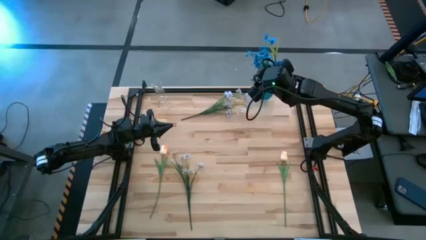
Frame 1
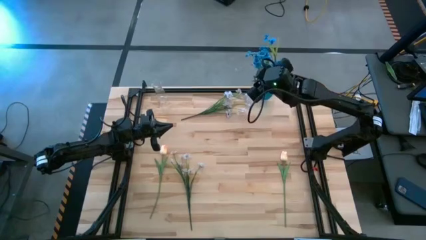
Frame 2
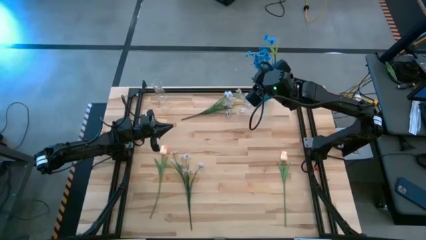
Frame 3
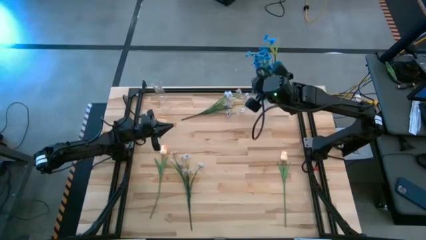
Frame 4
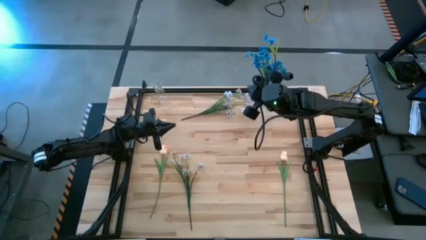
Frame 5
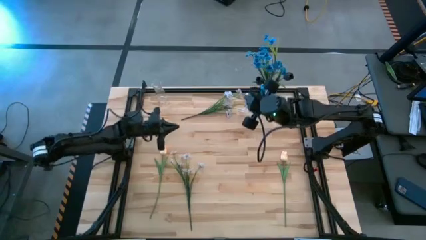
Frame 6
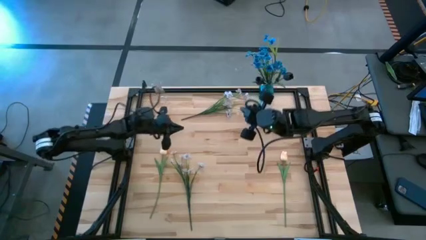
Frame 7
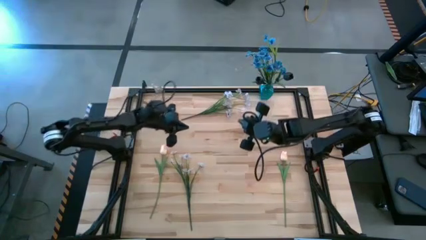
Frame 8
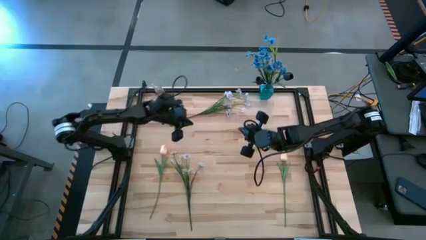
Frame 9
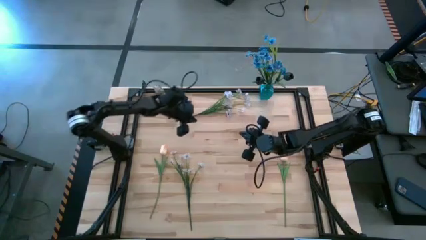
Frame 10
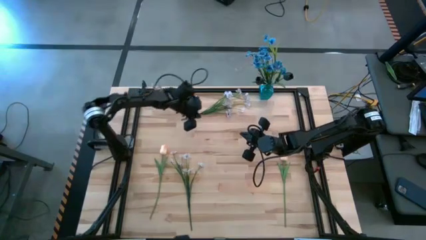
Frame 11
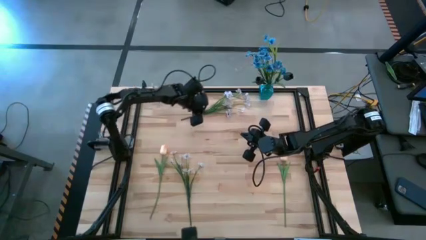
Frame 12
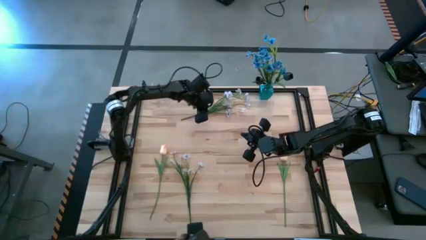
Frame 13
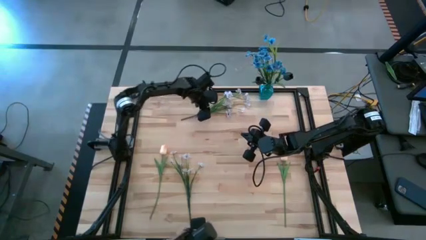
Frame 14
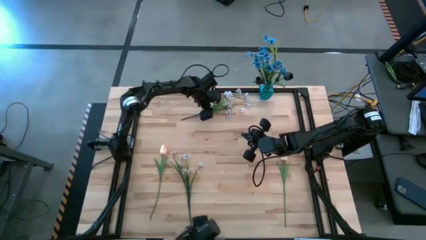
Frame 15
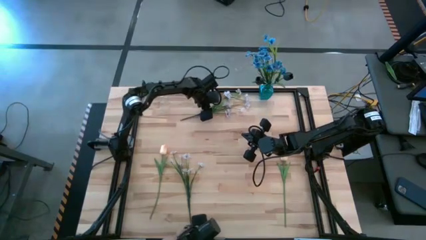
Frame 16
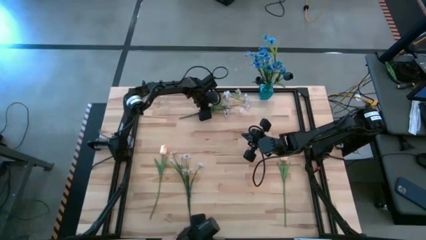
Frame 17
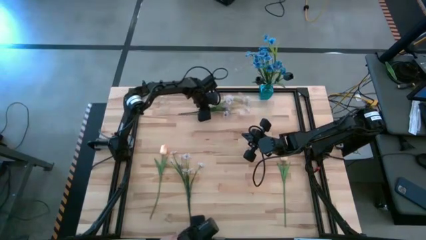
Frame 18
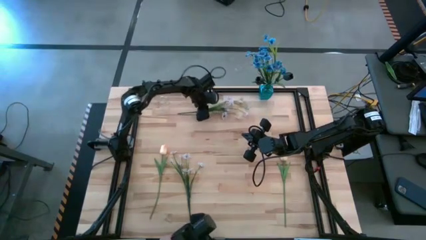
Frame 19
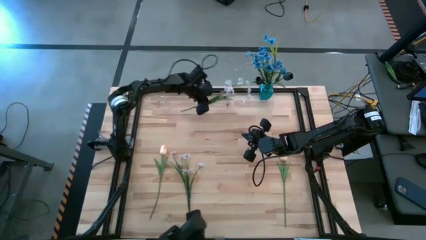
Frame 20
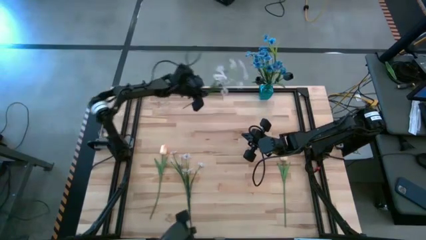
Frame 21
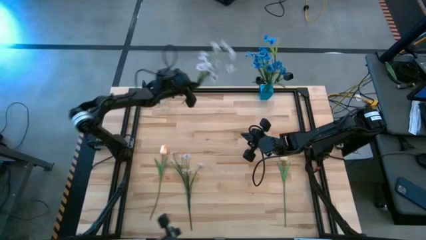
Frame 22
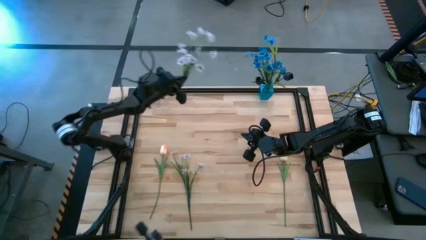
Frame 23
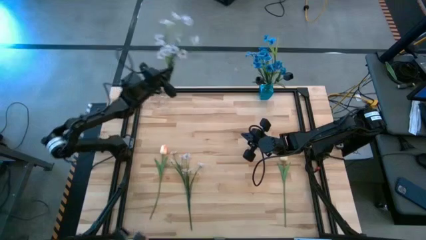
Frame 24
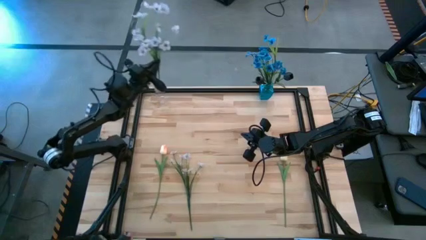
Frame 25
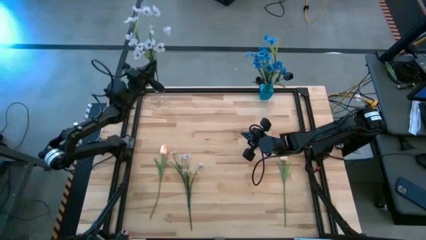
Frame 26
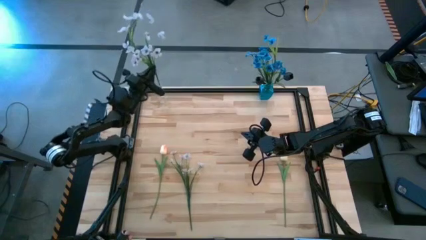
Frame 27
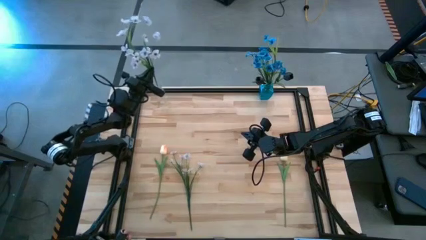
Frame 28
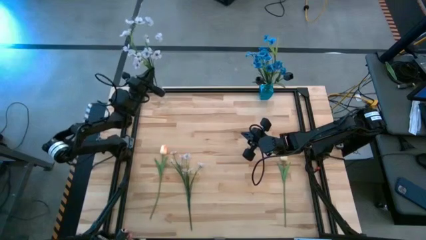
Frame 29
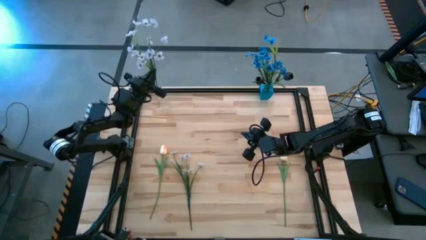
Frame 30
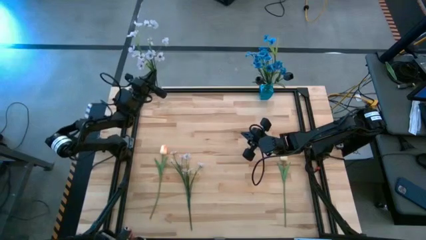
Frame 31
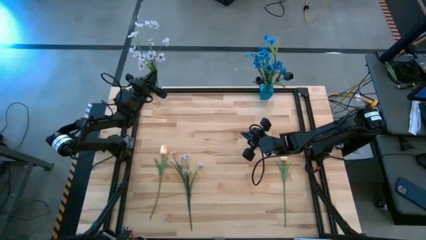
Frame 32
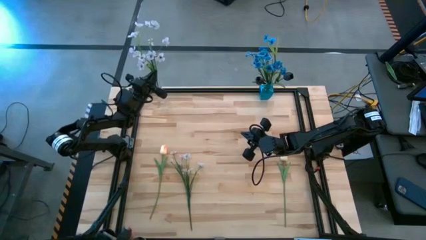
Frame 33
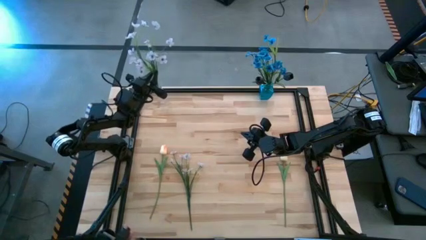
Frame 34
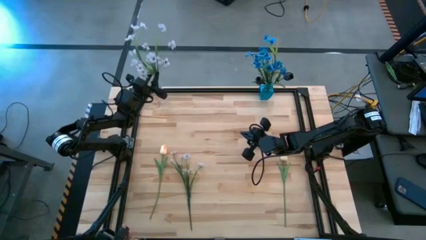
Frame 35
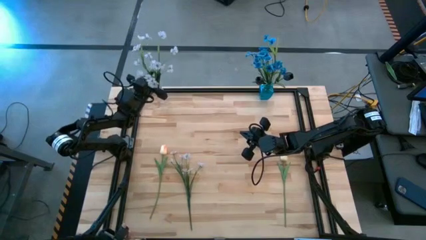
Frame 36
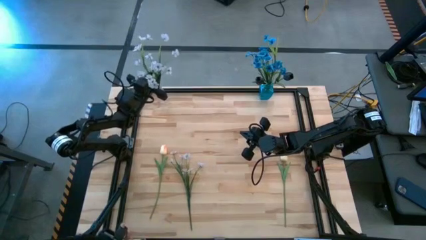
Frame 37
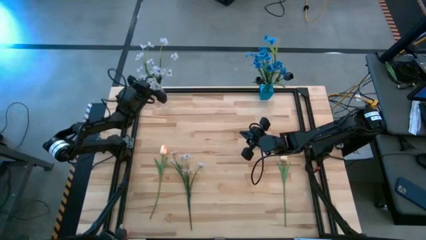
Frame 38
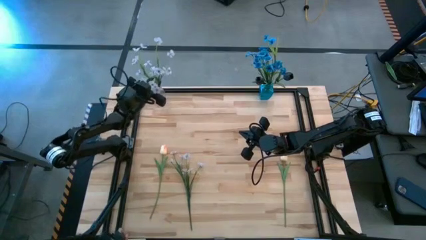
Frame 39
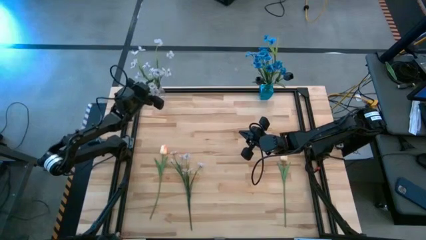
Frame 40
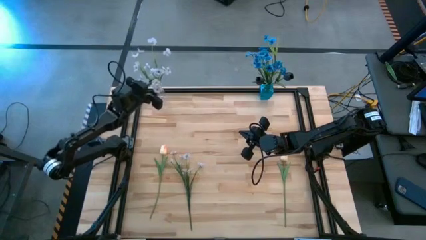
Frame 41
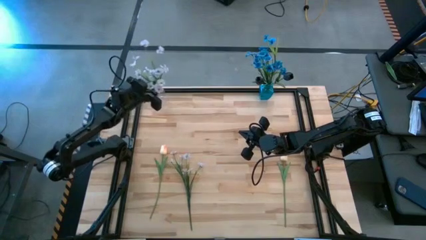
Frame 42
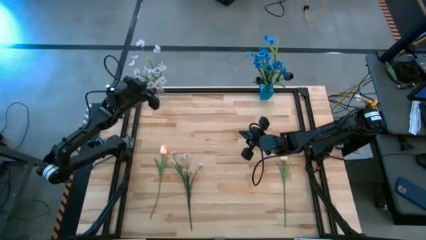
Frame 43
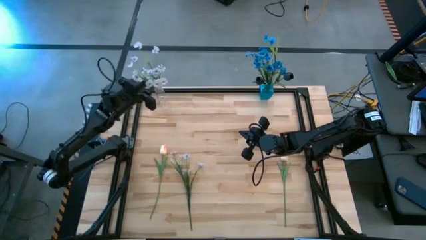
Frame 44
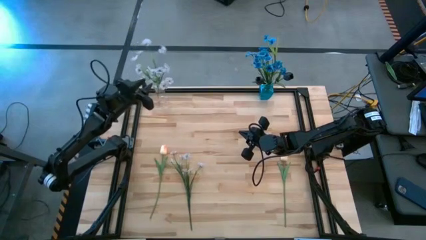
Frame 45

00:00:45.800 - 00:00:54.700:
Task: Sort flowers into vase by color
Put the top white flower into the transparent vase

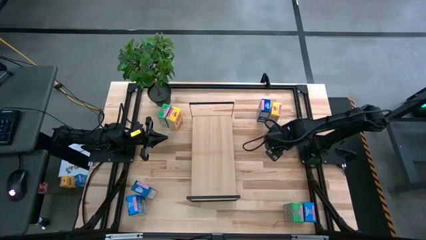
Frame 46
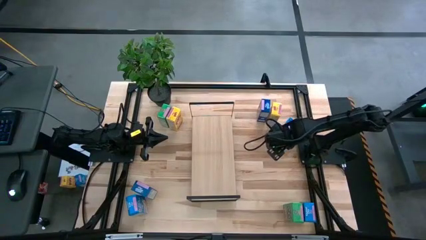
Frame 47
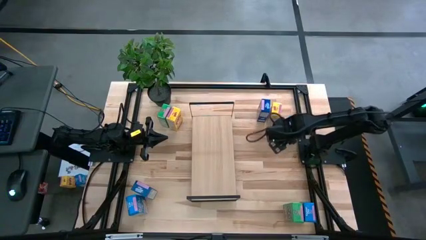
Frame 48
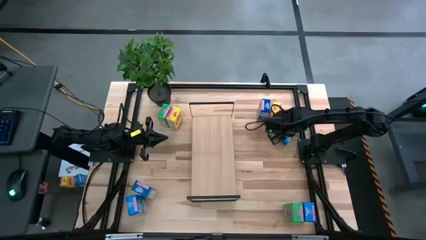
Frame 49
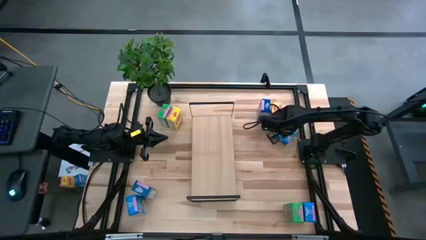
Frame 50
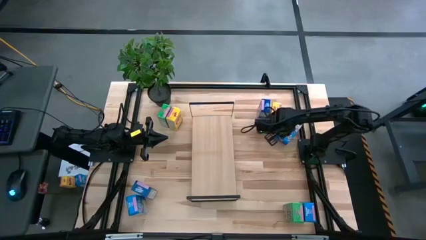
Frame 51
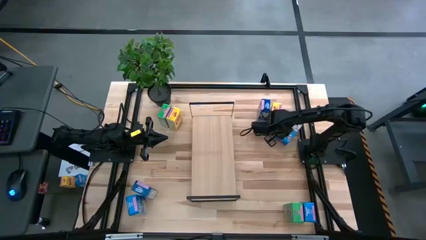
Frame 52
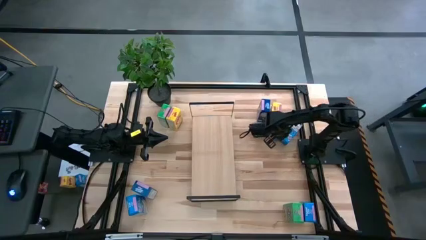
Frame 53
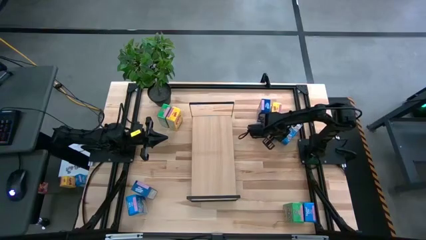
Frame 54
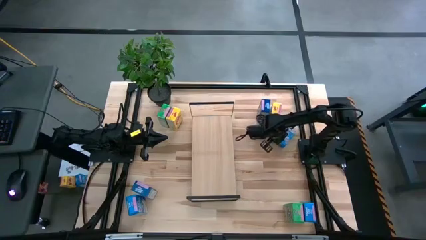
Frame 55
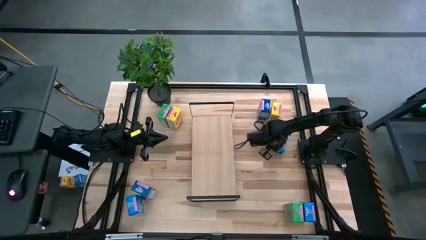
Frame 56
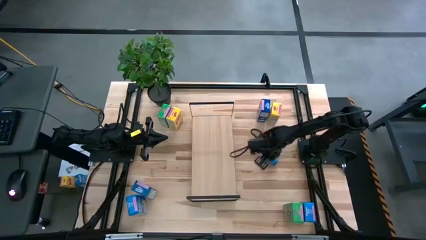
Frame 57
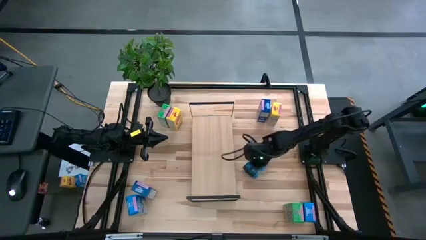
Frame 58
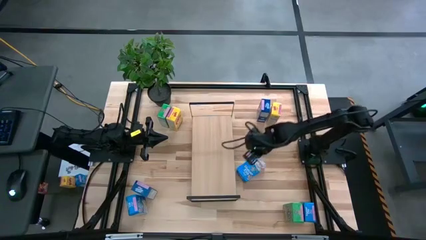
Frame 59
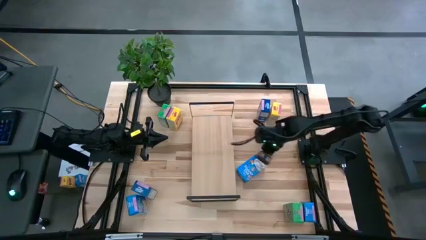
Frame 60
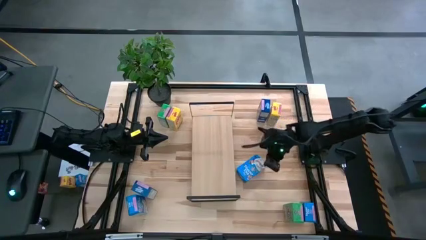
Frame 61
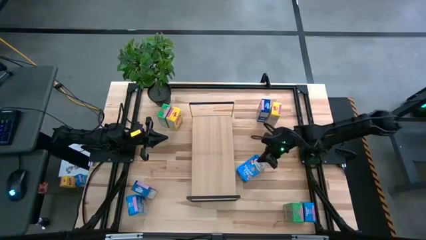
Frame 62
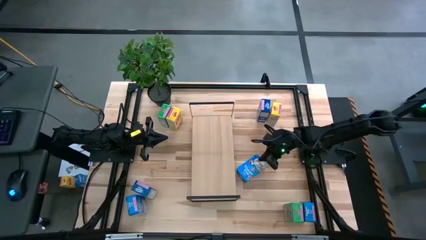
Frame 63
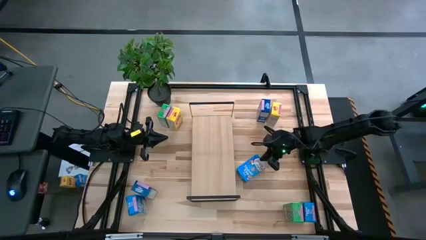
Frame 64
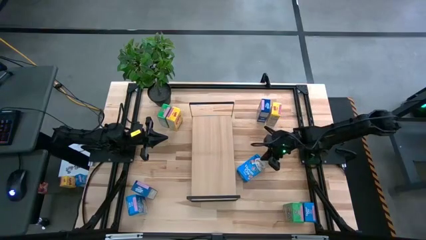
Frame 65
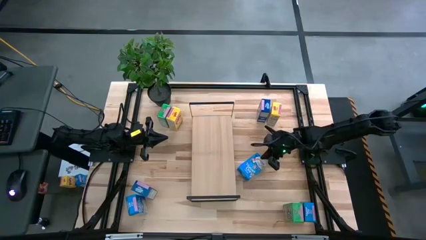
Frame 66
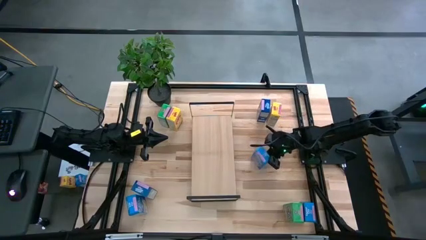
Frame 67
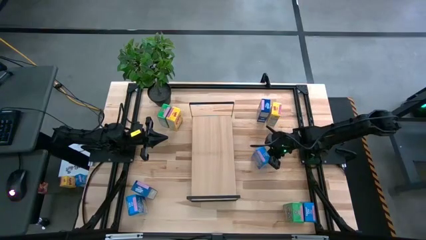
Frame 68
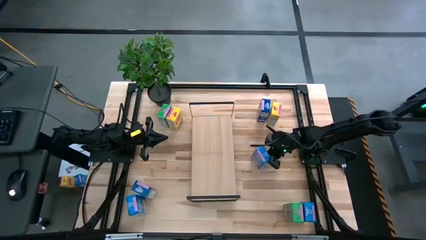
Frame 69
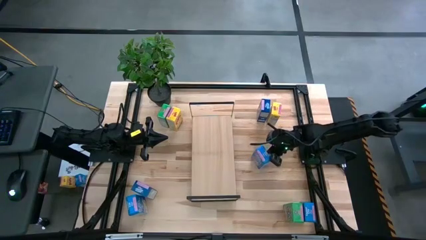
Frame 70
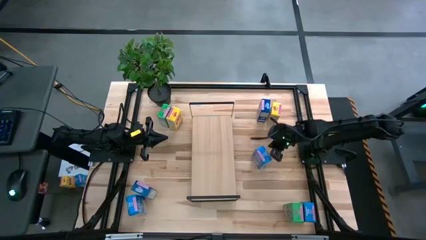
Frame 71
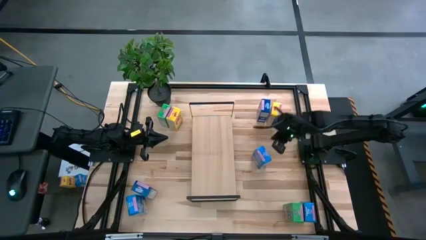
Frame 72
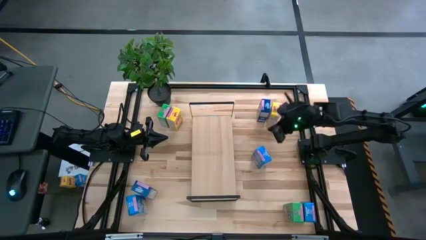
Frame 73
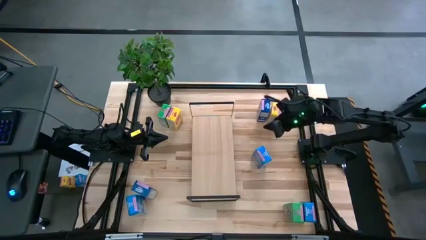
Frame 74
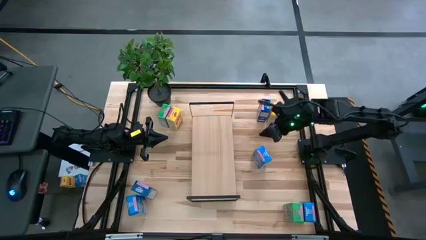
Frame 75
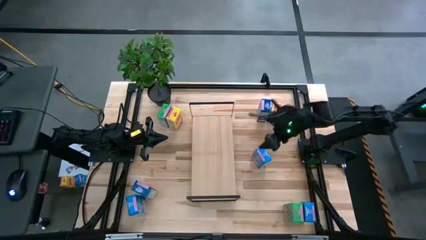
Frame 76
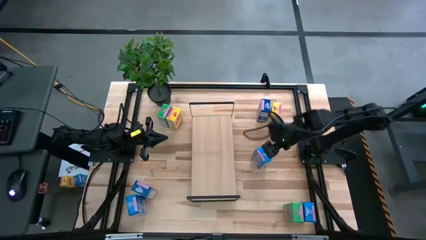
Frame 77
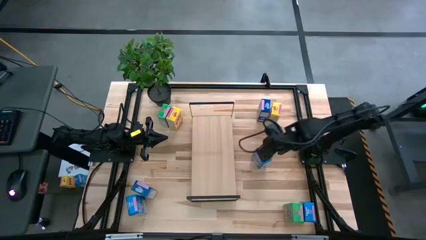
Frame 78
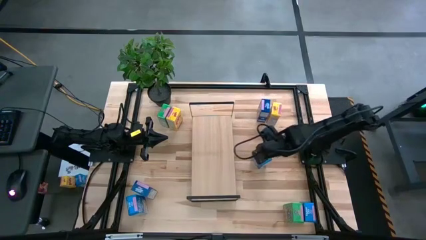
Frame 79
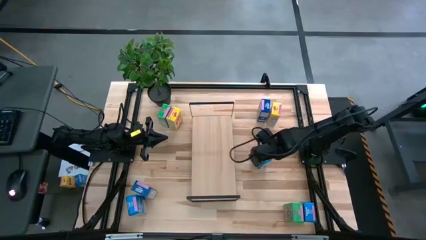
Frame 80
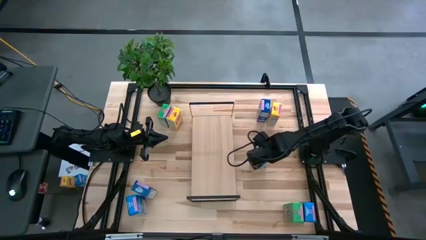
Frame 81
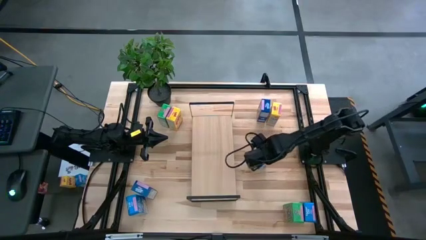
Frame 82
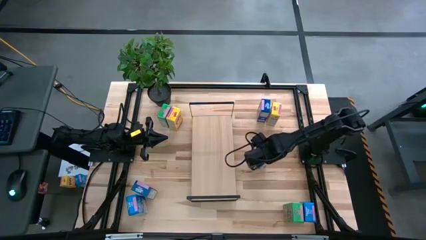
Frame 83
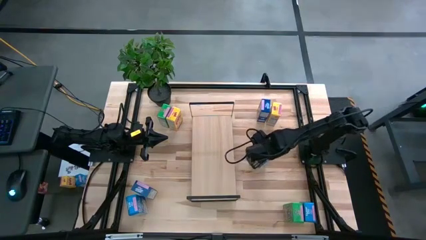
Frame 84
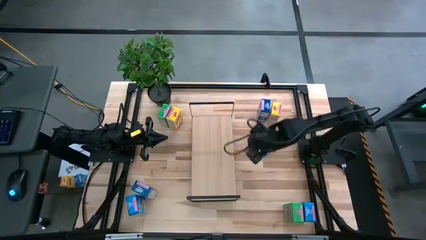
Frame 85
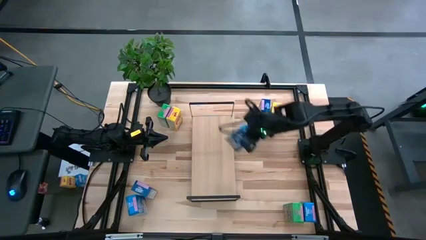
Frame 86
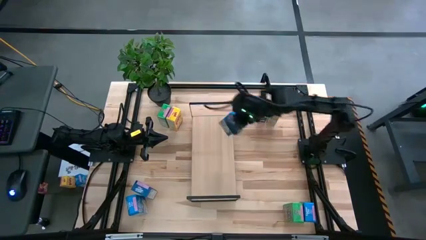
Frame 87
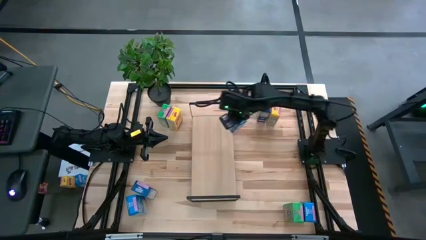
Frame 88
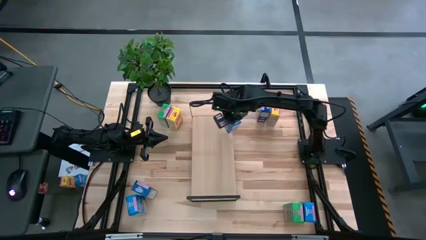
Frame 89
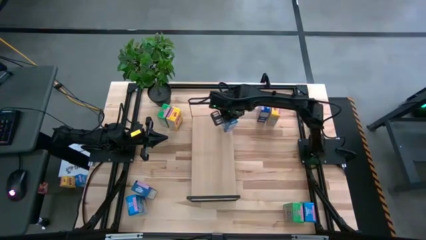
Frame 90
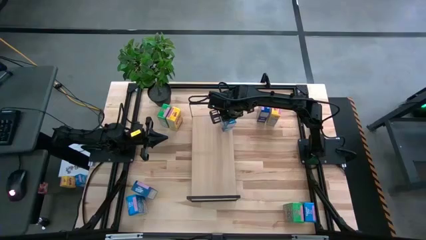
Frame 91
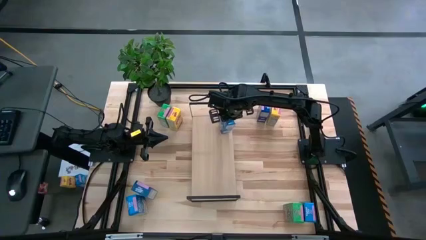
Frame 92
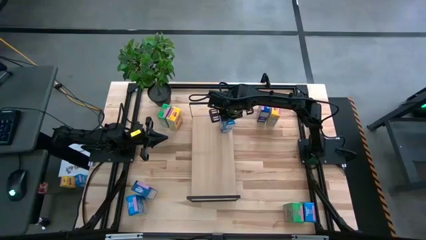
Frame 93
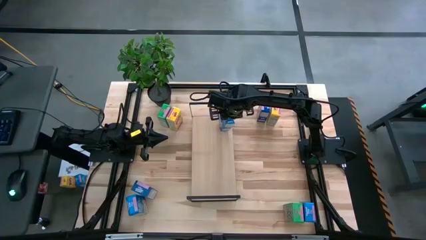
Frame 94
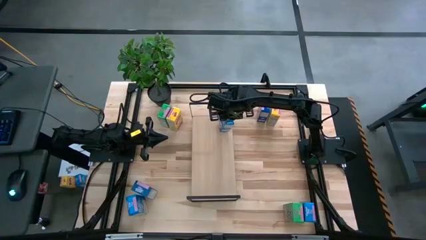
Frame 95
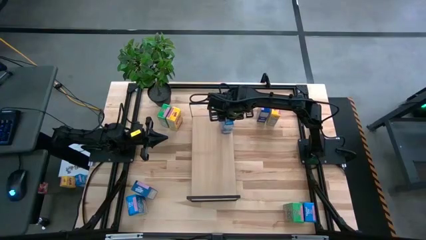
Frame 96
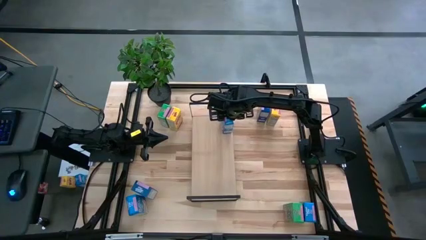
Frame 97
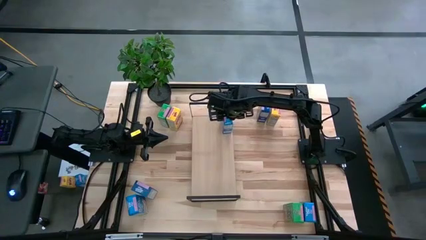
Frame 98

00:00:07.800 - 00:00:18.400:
Task: Stack cereal on shelf
Put the top right light blue cereal box on the shelf
